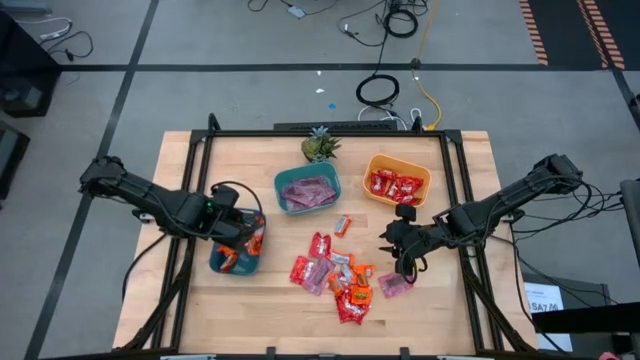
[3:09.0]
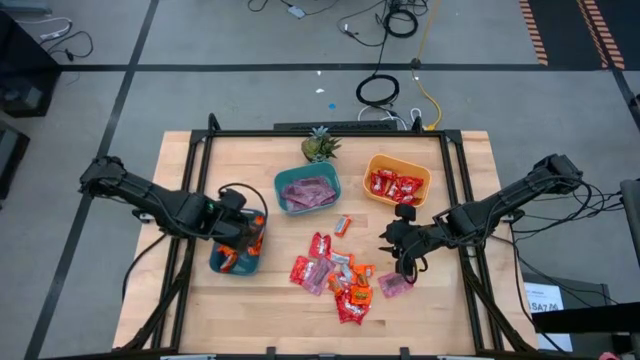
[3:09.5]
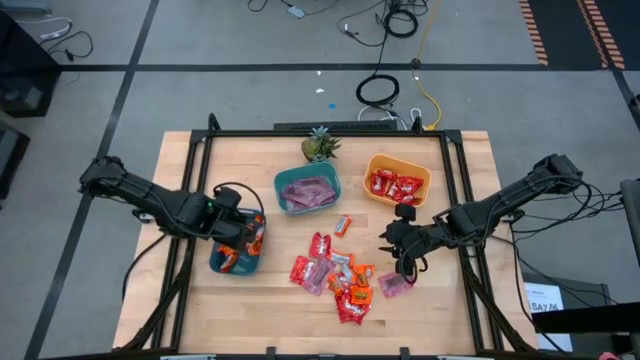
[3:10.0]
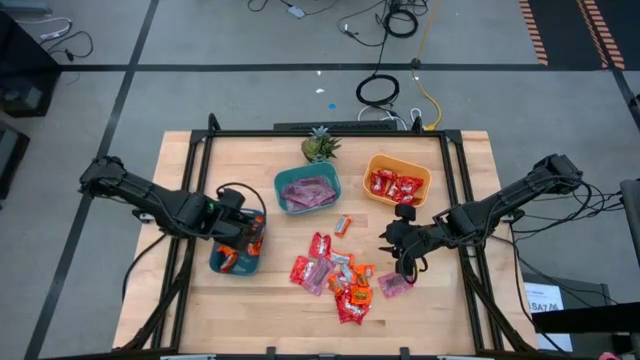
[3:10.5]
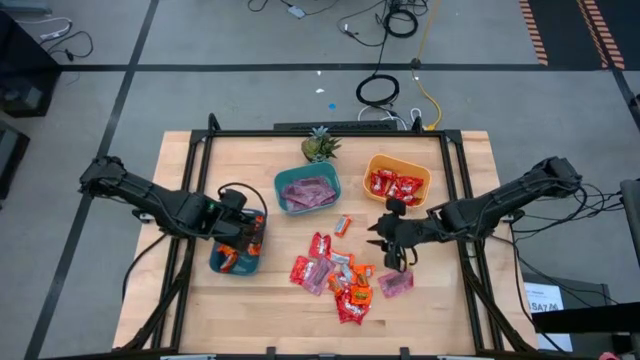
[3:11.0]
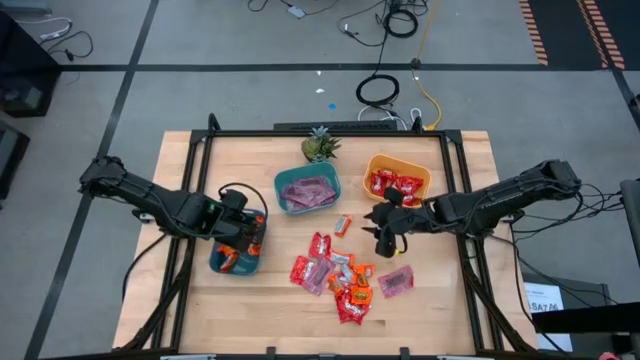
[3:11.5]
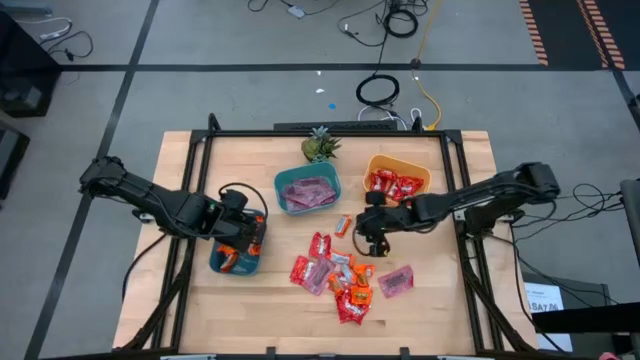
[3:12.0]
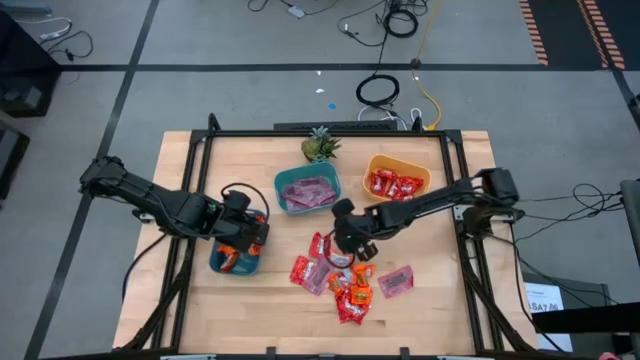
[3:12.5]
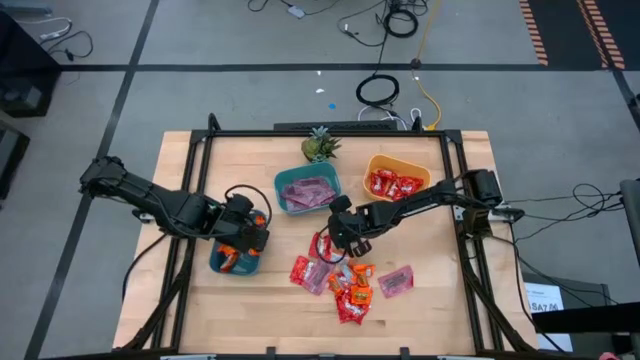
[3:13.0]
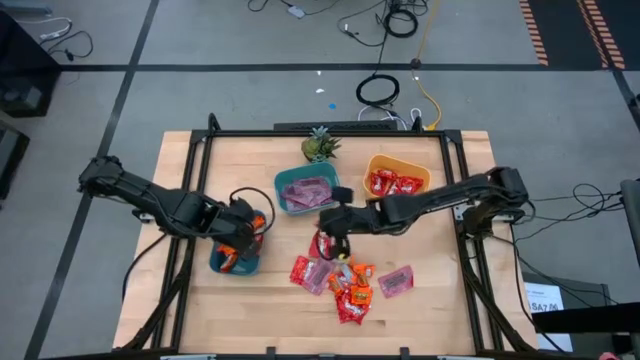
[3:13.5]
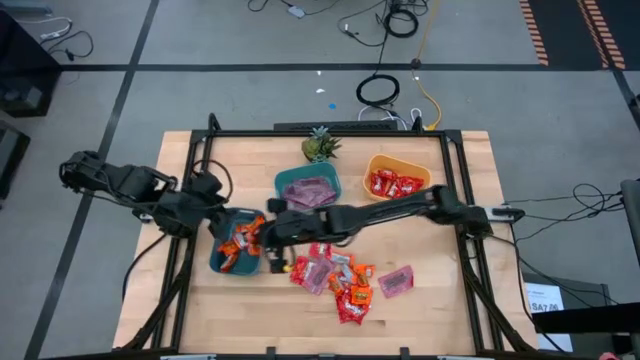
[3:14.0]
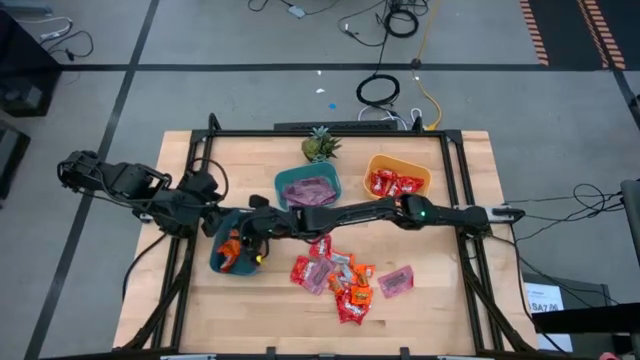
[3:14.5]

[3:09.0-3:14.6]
Task: Sort candy
Put the orange chocolate into the blue bin

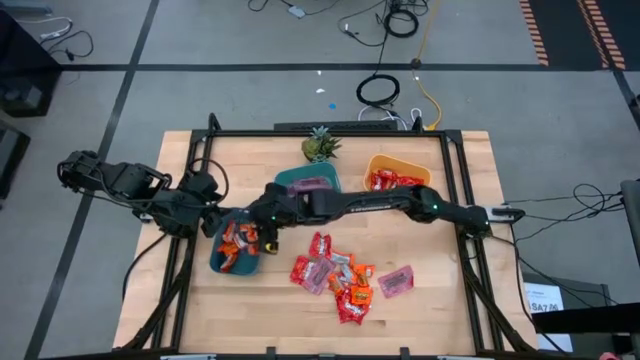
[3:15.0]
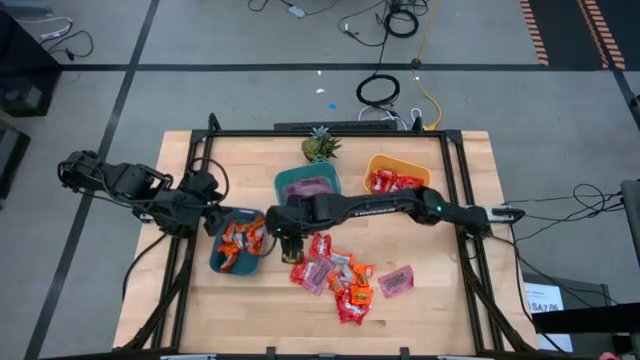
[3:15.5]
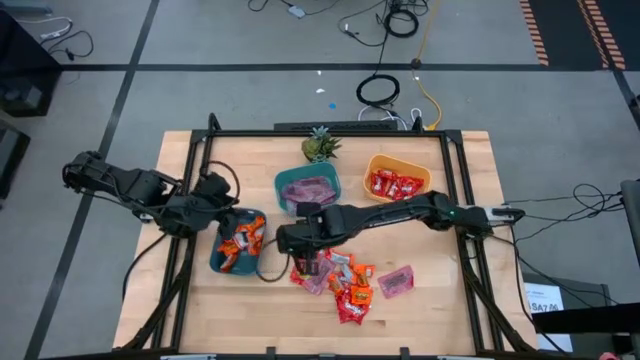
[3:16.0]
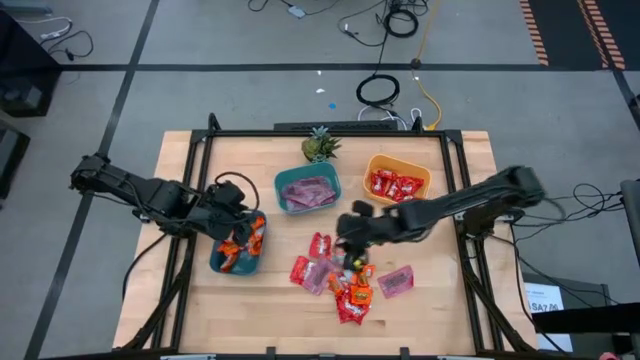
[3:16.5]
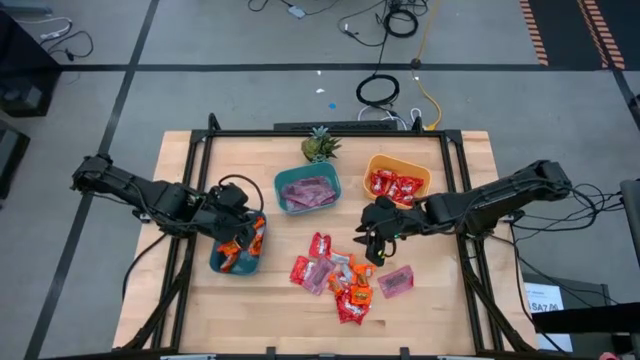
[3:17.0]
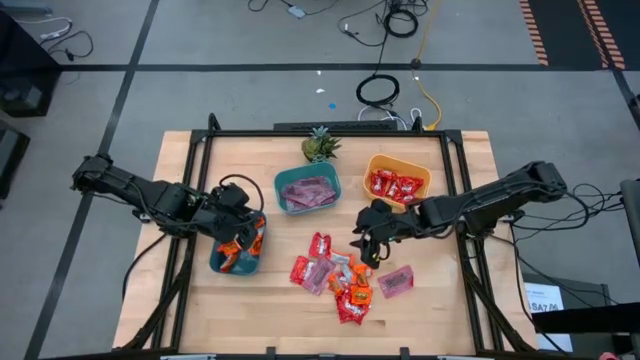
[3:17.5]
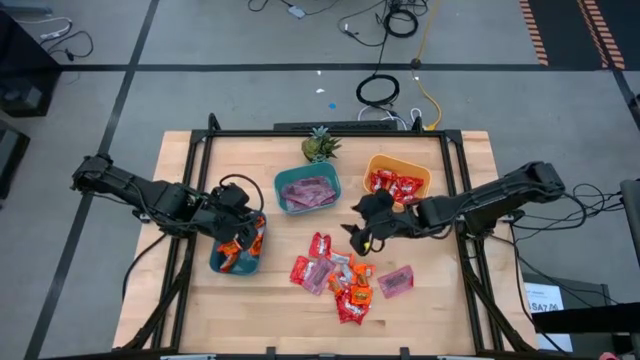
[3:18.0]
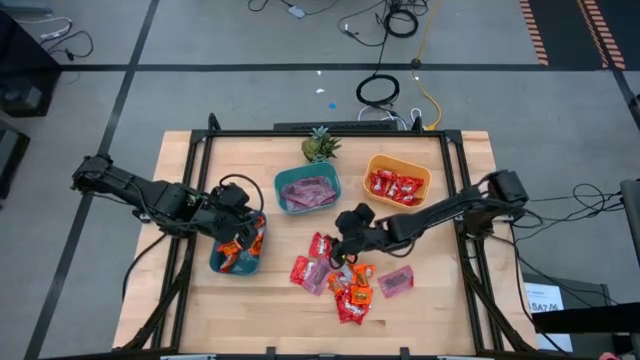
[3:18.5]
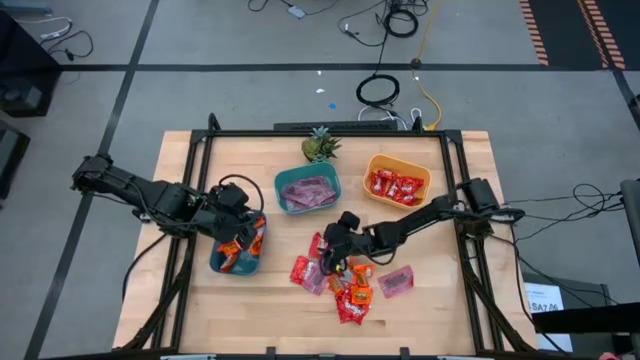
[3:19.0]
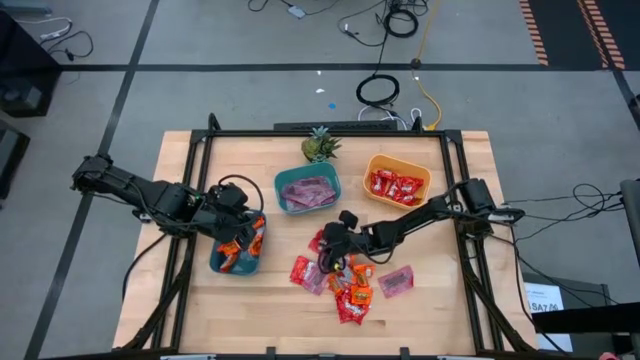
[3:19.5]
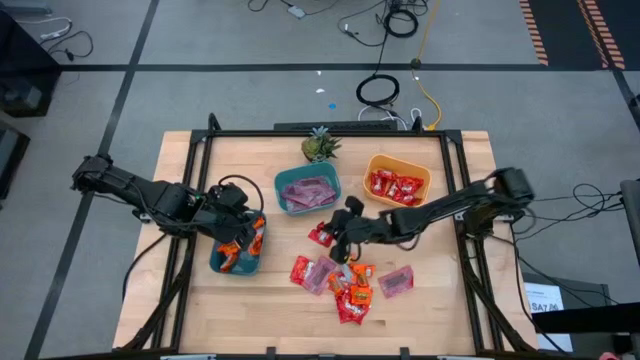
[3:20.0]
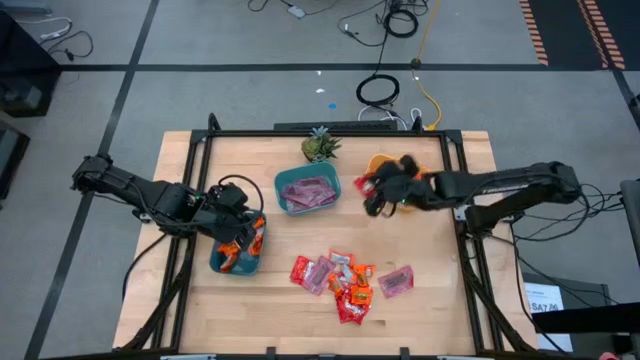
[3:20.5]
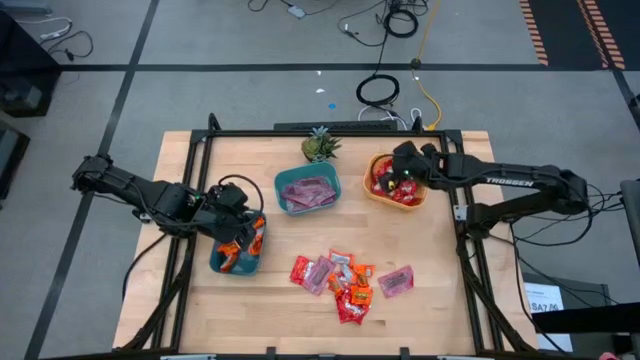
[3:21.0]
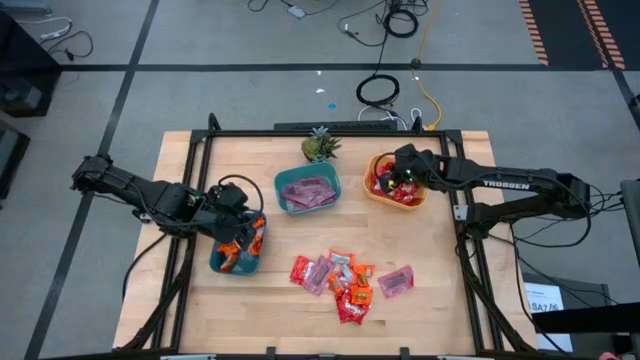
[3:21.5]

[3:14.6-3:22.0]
Put the red candy into the yellow bin

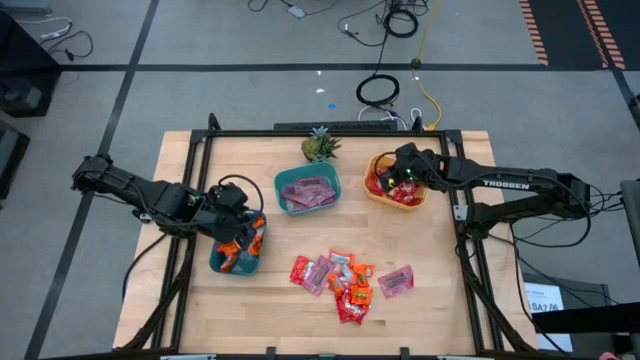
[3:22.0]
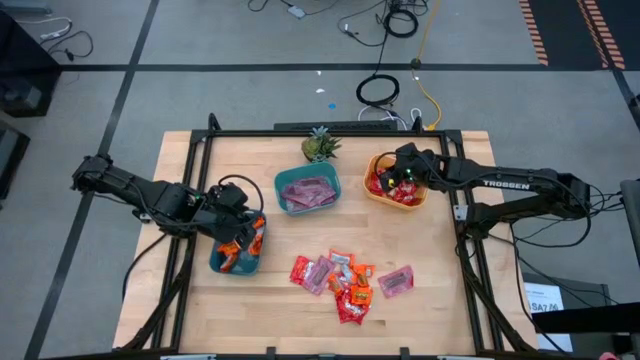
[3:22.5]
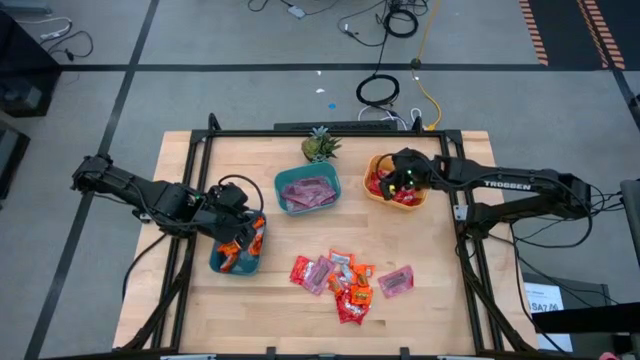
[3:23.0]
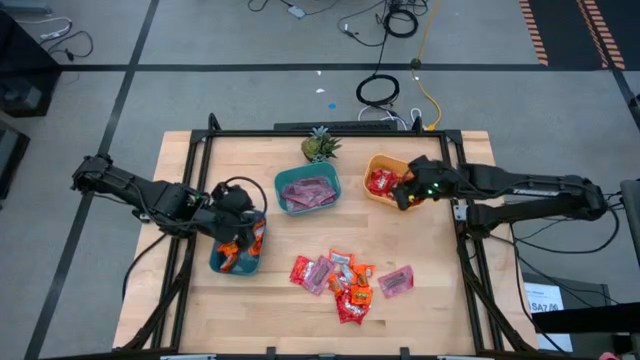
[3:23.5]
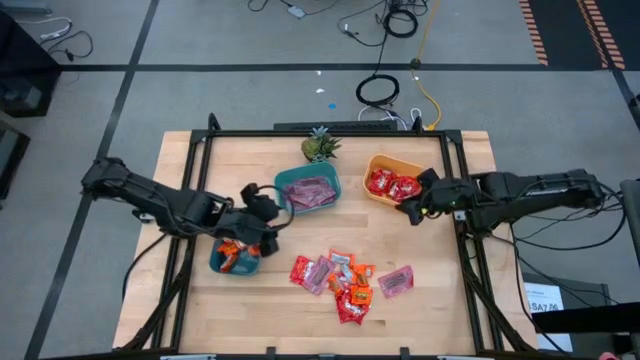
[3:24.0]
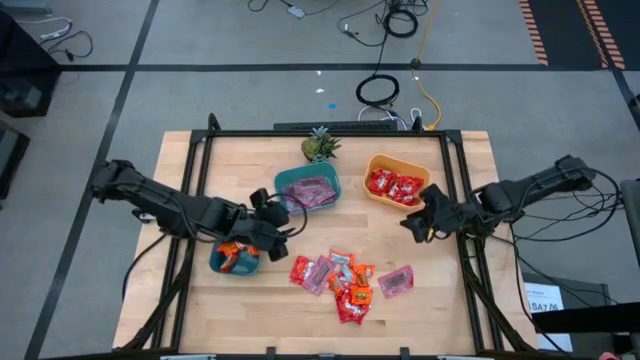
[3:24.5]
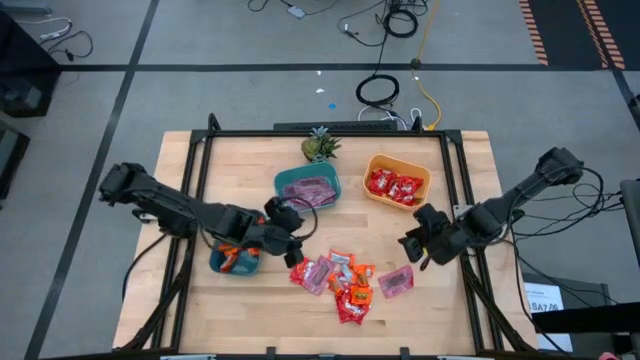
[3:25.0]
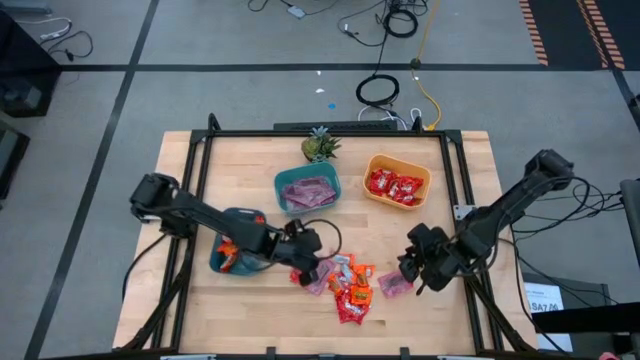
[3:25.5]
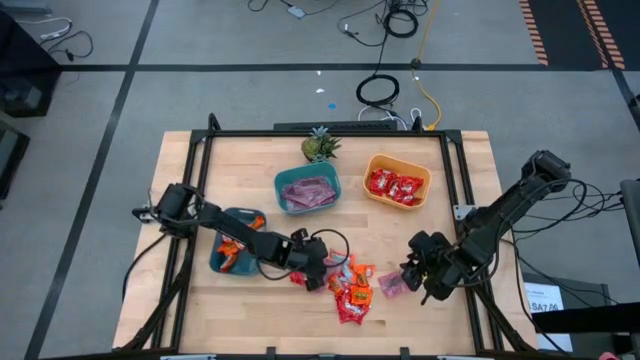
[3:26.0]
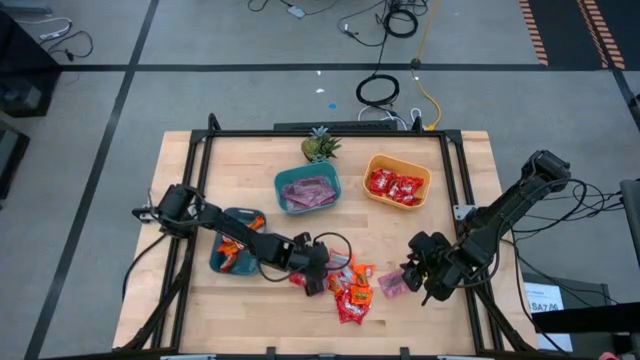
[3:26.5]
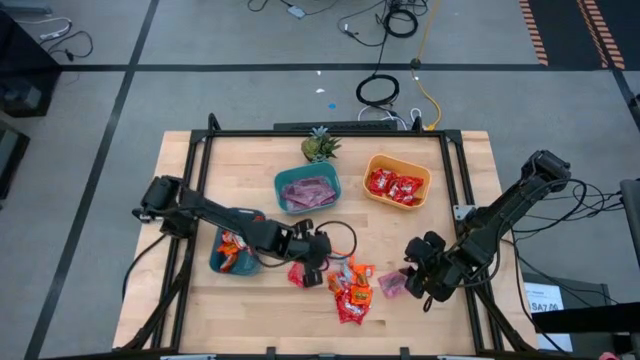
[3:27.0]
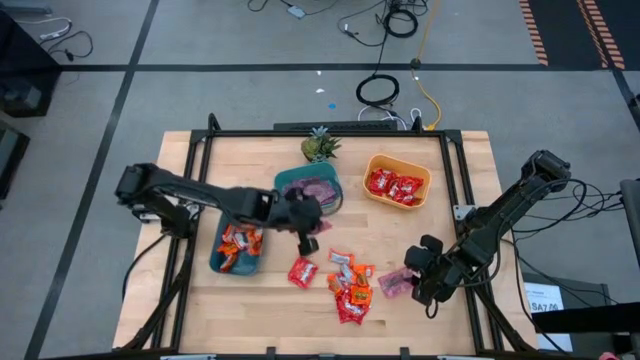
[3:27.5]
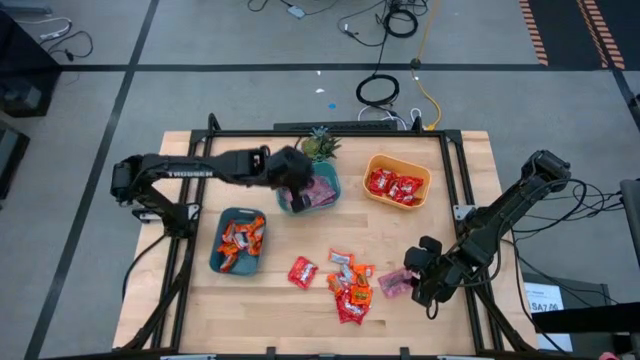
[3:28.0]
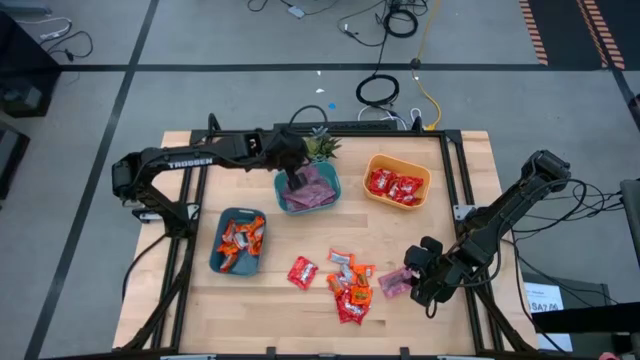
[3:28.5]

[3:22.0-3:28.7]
Put the pink candy into the light blue bin
